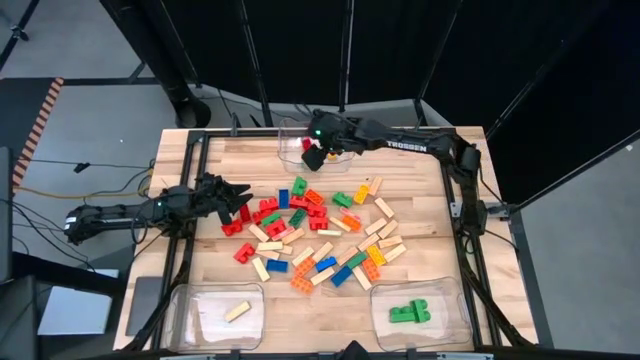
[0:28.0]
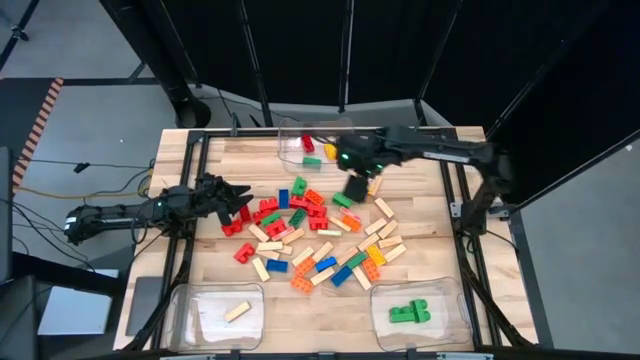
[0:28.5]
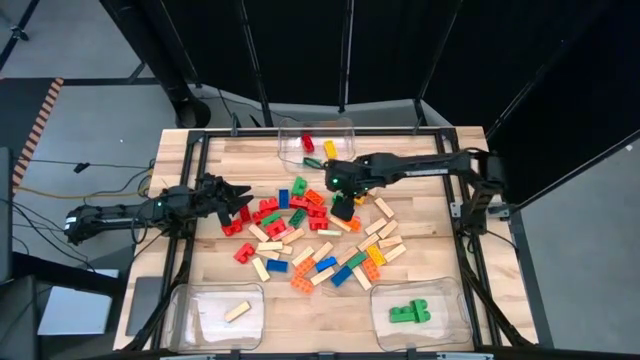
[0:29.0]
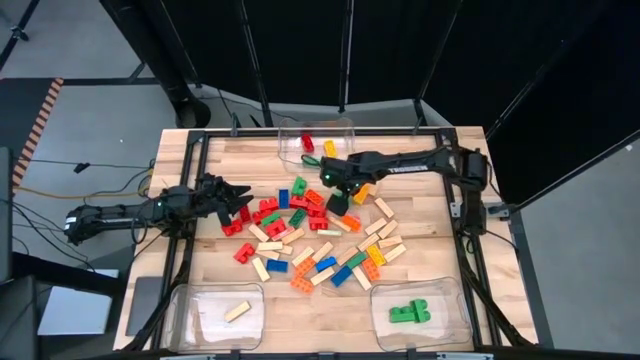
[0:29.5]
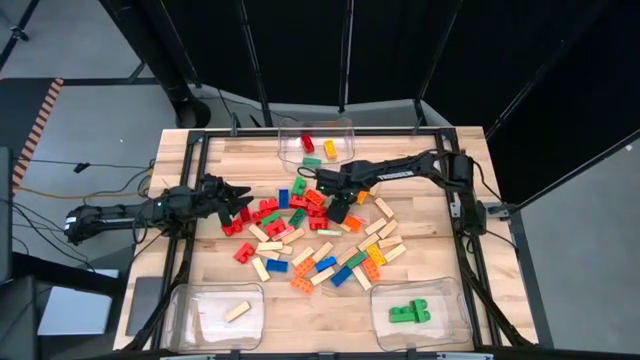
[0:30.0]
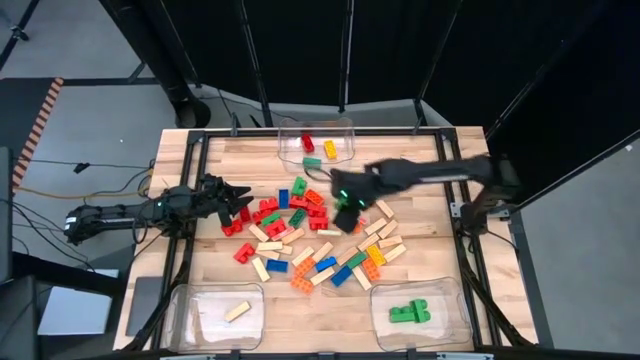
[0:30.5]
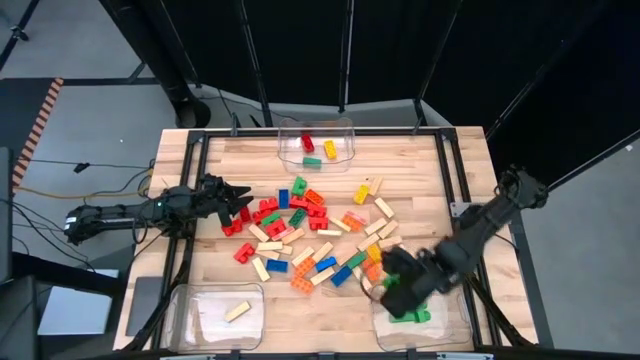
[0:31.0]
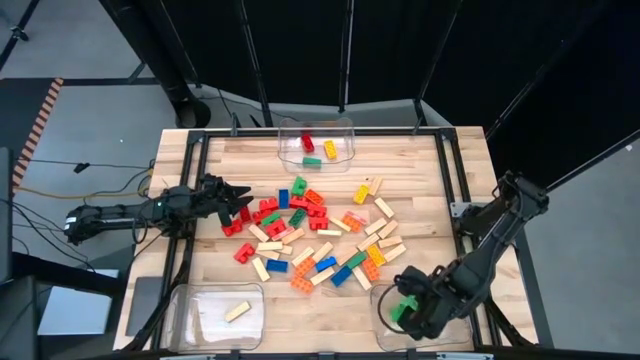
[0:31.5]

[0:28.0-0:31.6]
Task: Sort blocks by size
Put the 2-stud green game piece into the bottom right transparent bin

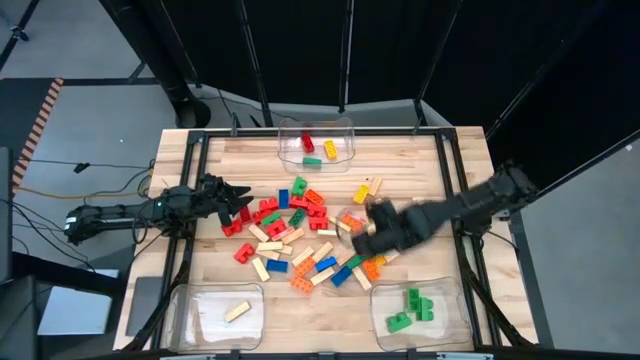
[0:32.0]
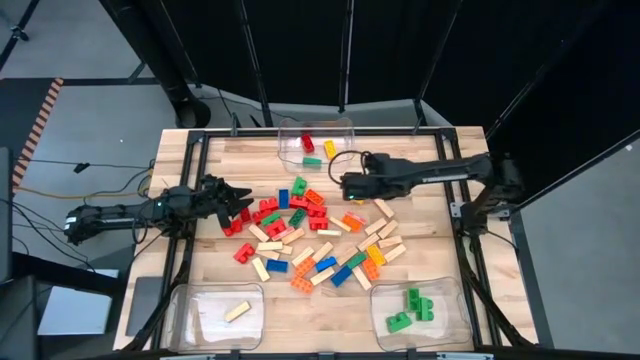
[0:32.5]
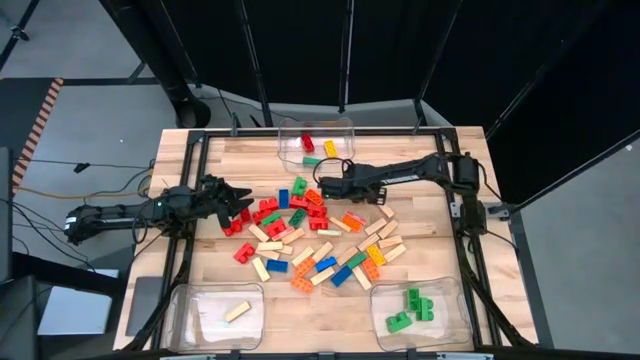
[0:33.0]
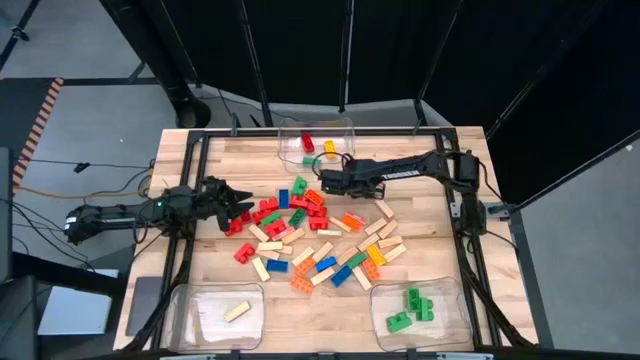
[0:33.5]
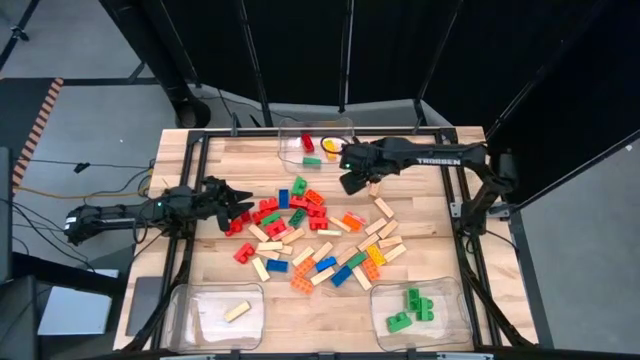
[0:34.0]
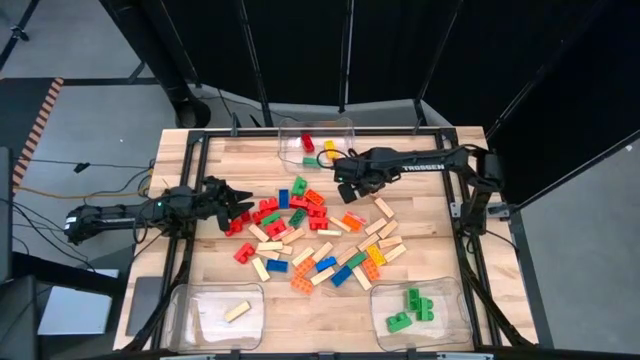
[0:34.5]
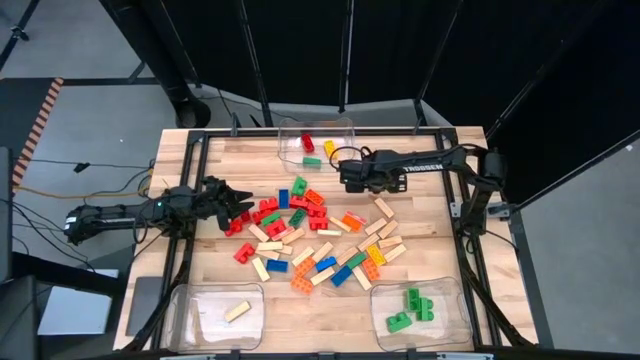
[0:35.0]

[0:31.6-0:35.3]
Put the 3-stud yellow game piece into the bottom left transparent bin

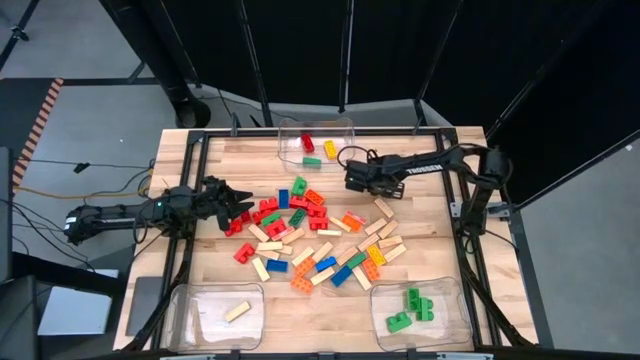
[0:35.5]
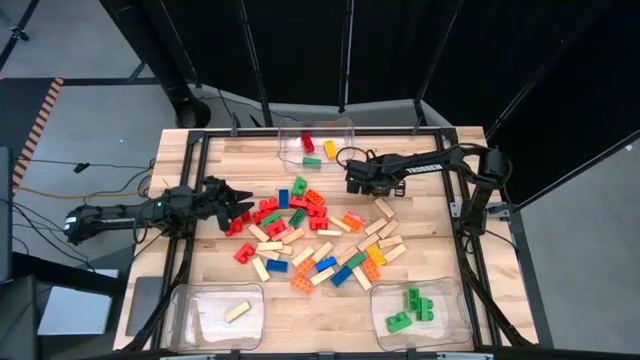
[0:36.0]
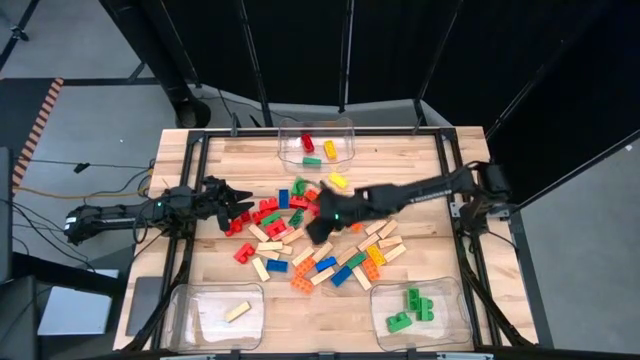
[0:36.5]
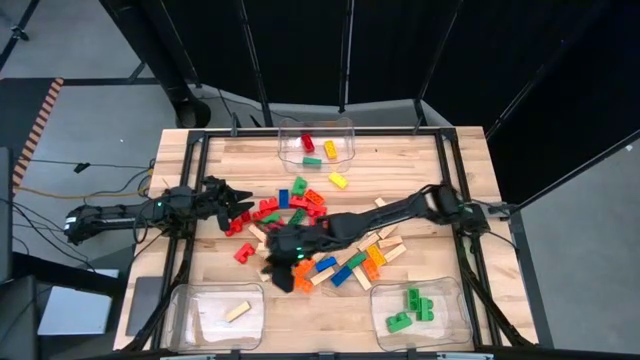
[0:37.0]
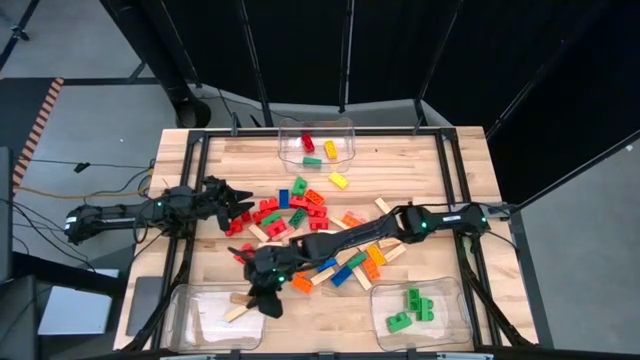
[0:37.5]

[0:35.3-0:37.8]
Put the white block into the bottom left transparent bin

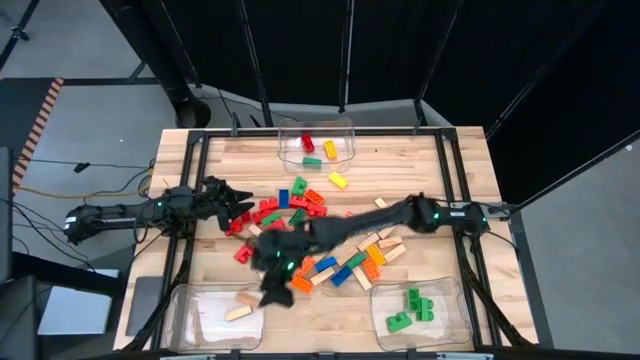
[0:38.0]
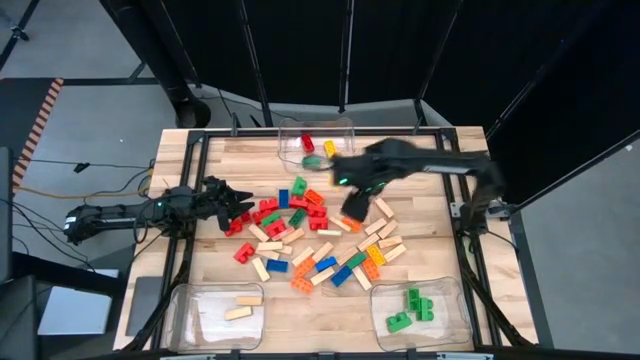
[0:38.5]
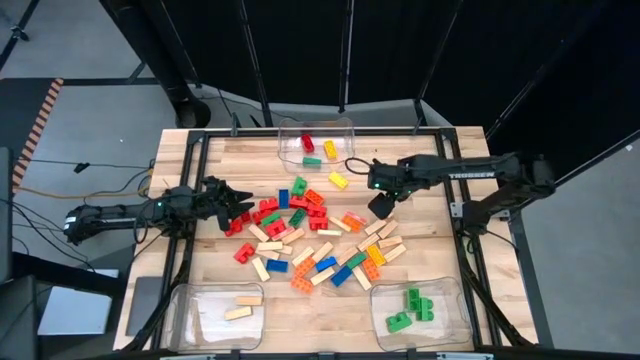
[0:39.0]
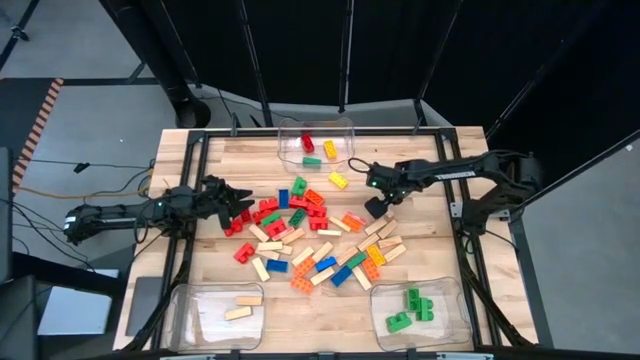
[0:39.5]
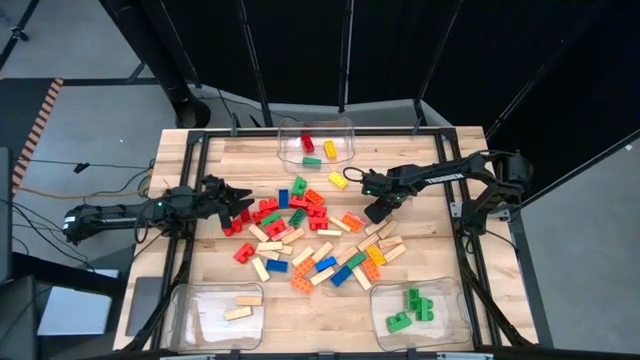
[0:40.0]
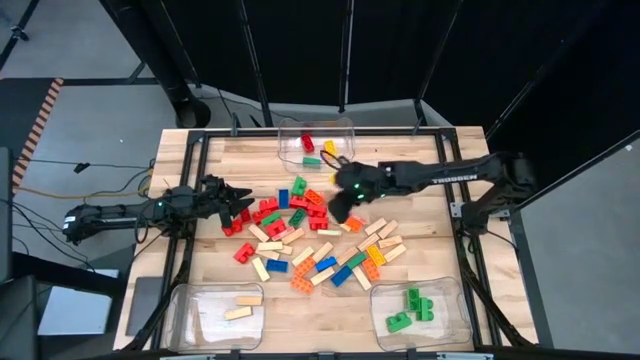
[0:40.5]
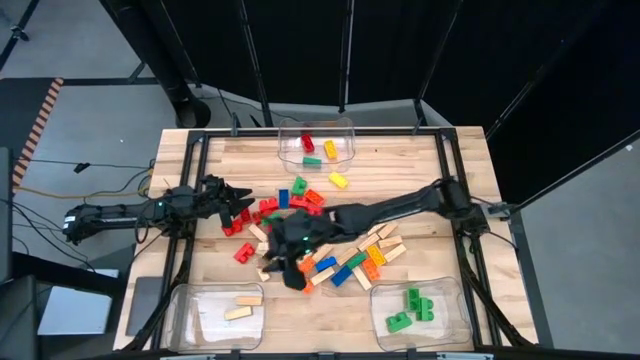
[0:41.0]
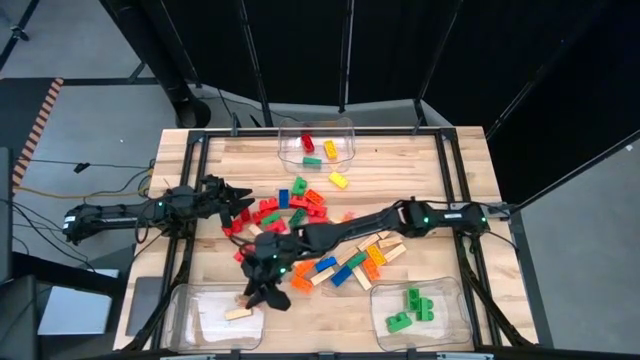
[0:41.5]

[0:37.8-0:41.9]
Put the white block into the bottom left transparent bin

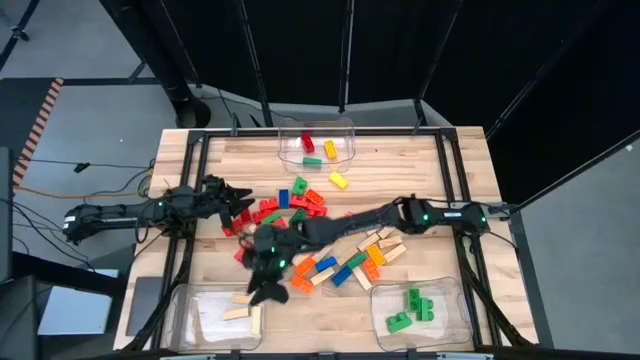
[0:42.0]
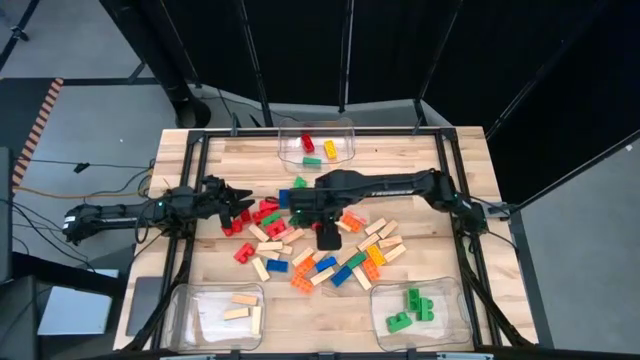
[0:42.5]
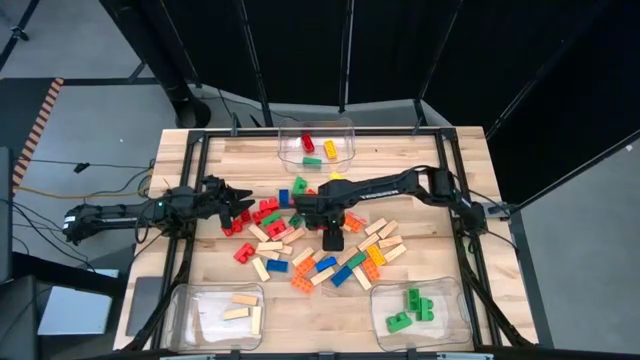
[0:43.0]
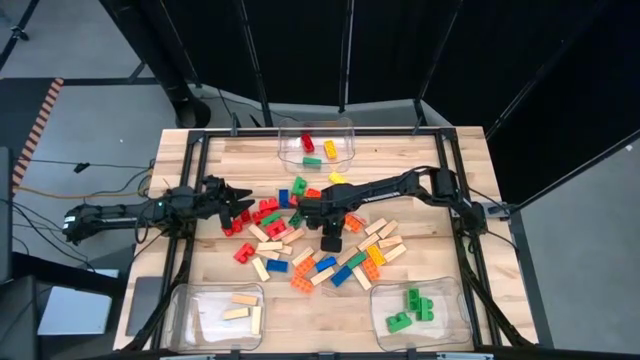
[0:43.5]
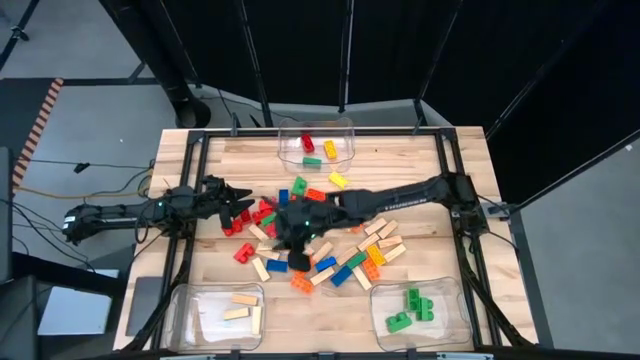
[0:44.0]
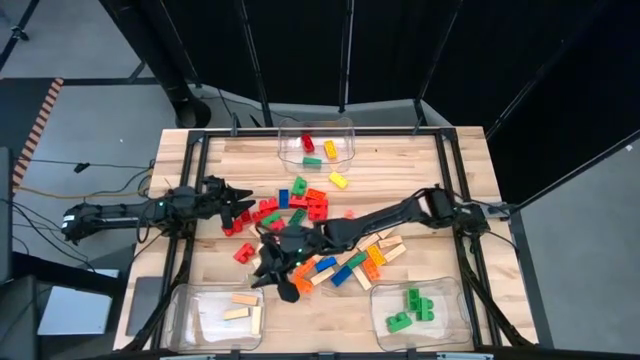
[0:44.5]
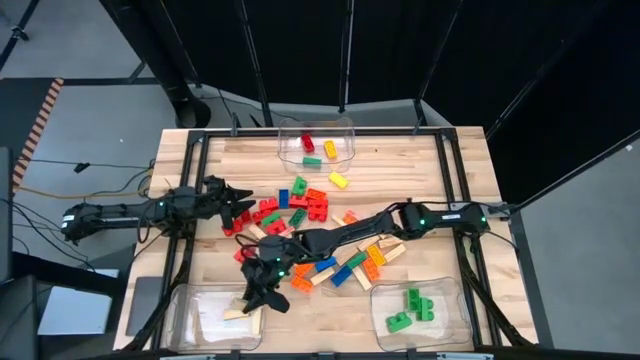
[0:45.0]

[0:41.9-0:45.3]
Put the white block into the bottom left transparent bin

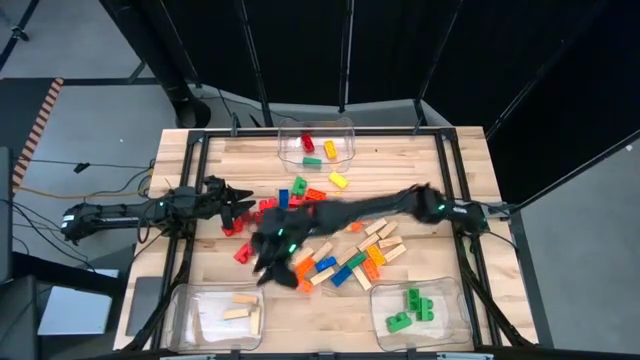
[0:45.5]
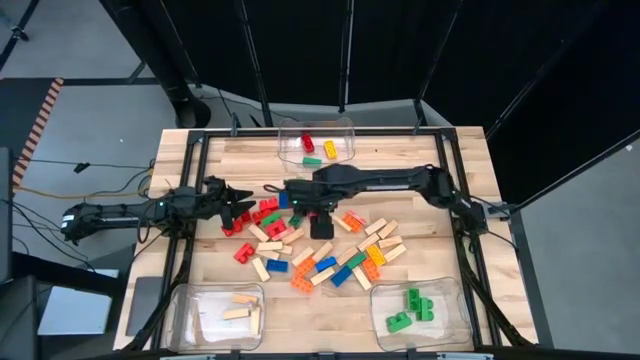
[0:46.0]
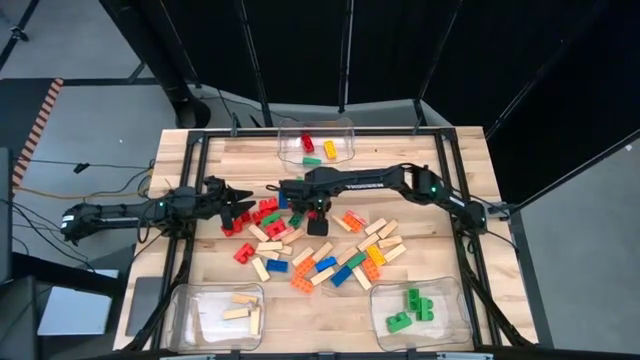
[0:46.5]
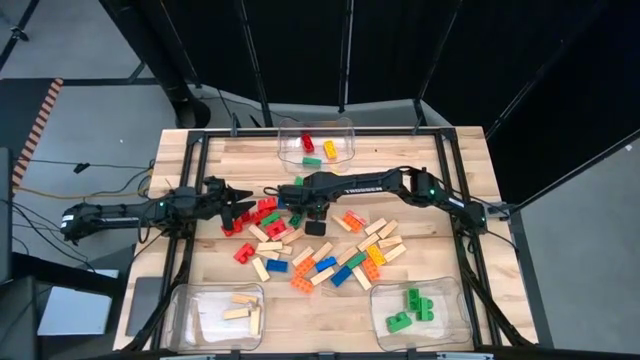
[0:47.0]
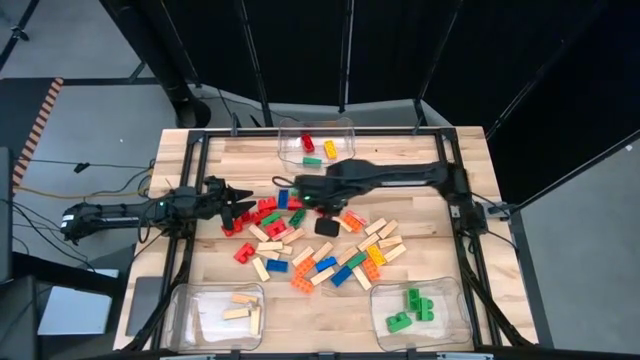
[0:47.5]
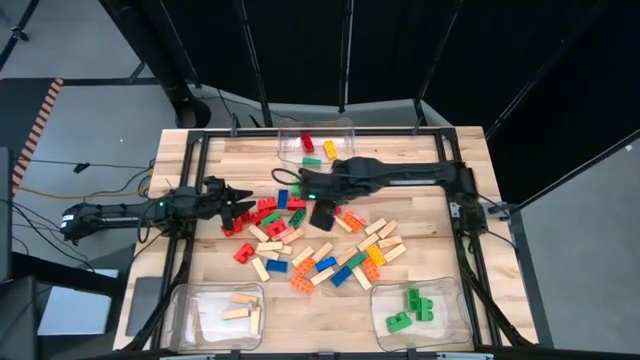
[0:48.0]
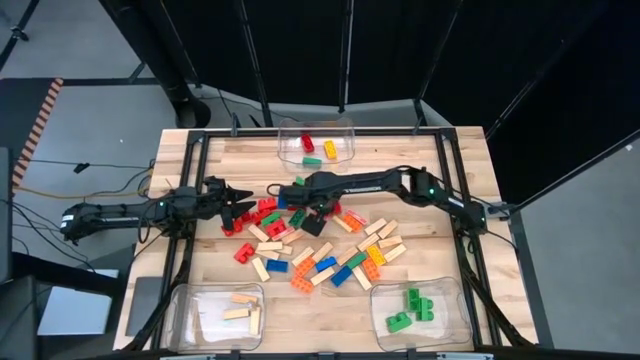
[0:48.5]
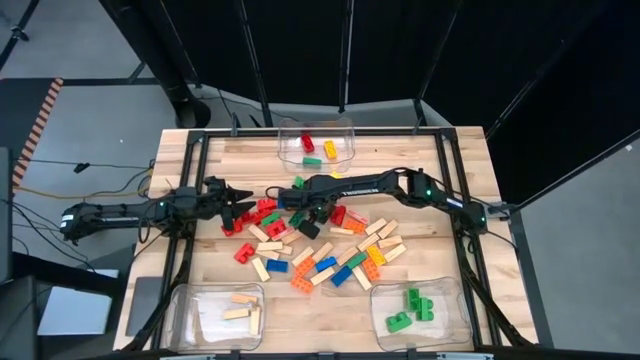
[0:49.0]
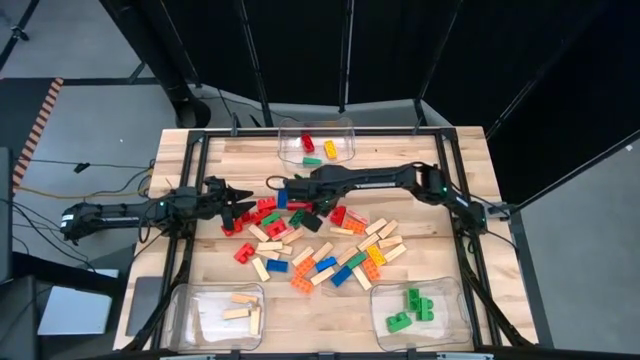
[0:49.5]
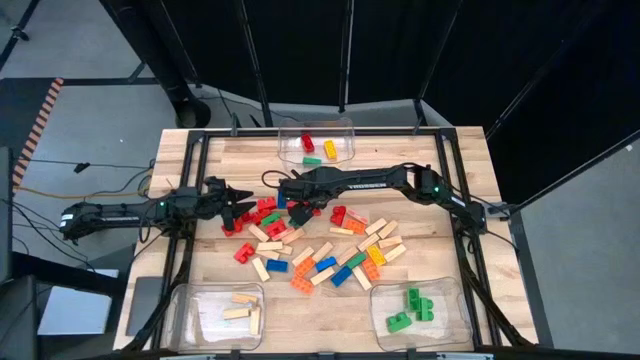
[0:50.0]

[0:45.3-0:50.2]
Put the 2-stud red game piece into the bottom right transparent bin
